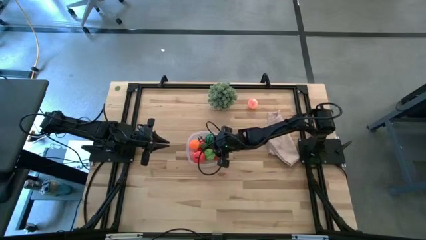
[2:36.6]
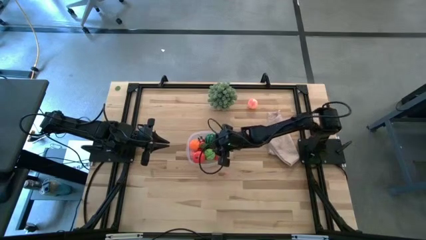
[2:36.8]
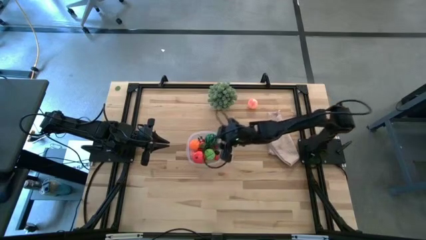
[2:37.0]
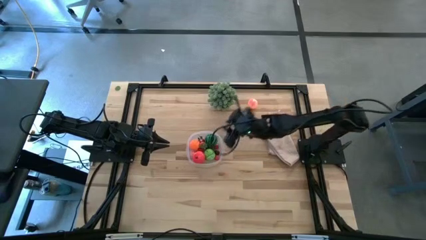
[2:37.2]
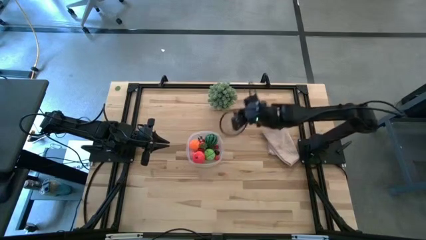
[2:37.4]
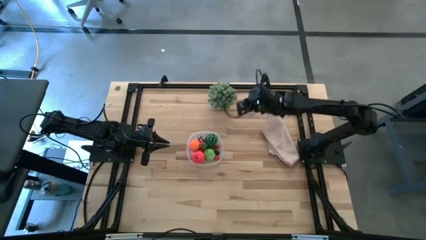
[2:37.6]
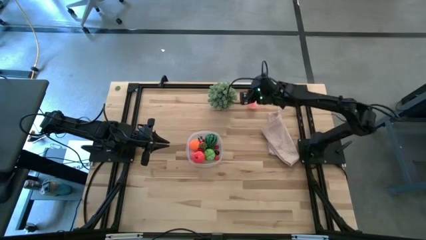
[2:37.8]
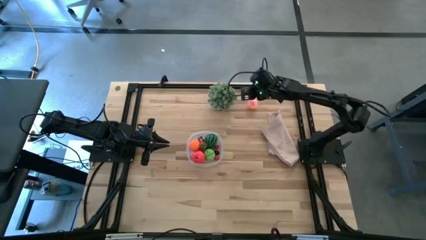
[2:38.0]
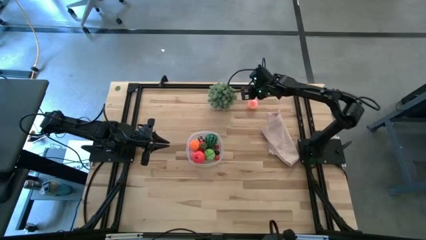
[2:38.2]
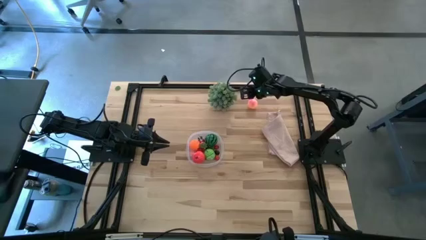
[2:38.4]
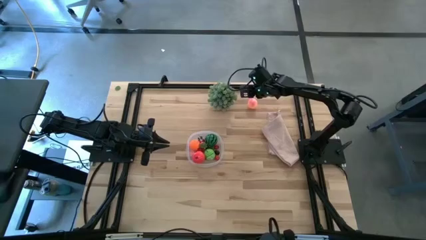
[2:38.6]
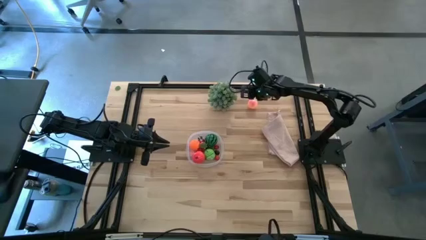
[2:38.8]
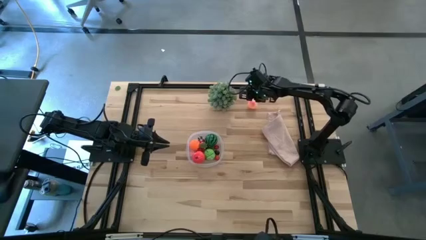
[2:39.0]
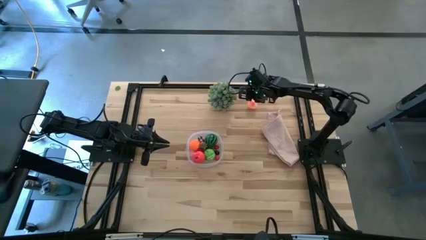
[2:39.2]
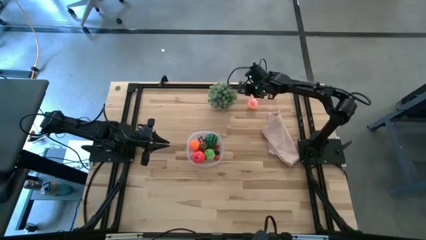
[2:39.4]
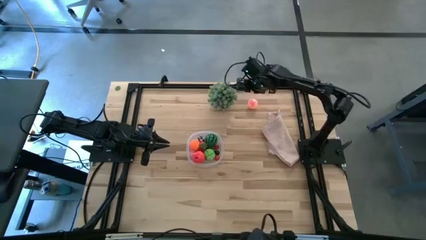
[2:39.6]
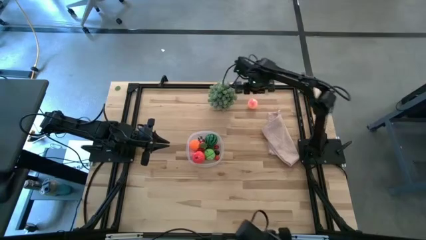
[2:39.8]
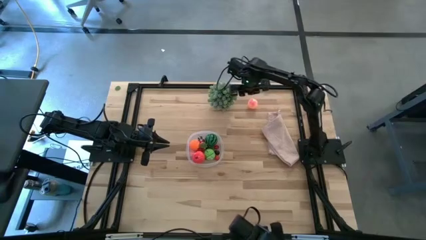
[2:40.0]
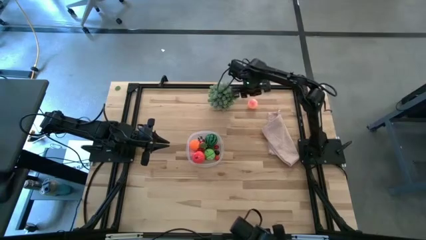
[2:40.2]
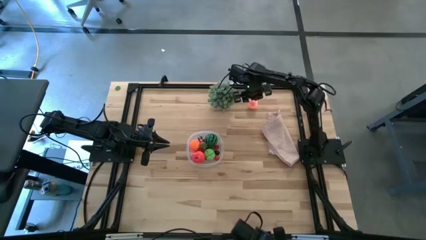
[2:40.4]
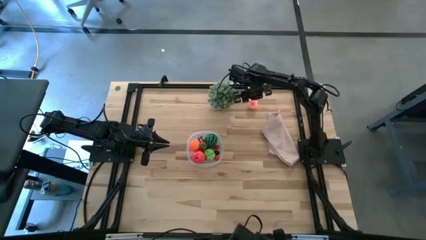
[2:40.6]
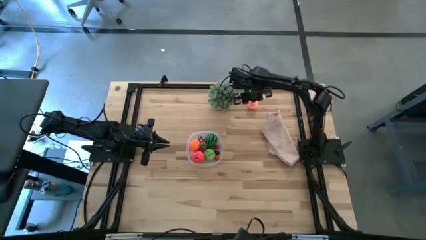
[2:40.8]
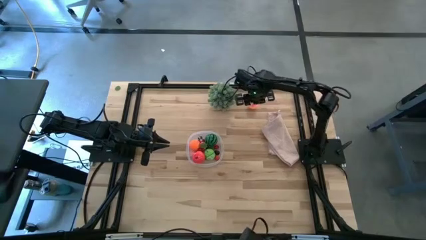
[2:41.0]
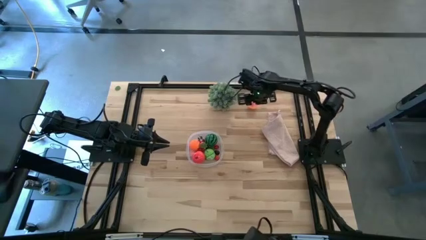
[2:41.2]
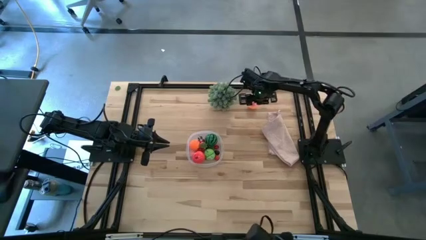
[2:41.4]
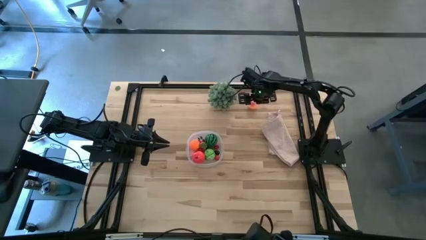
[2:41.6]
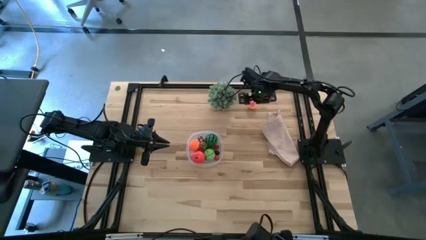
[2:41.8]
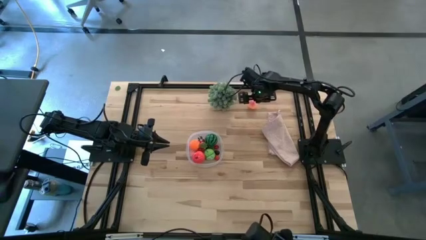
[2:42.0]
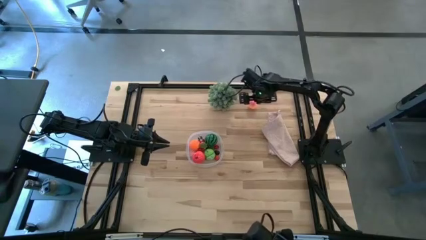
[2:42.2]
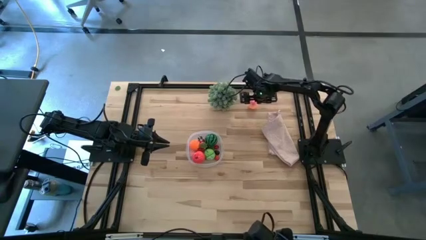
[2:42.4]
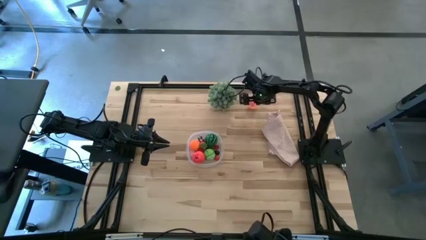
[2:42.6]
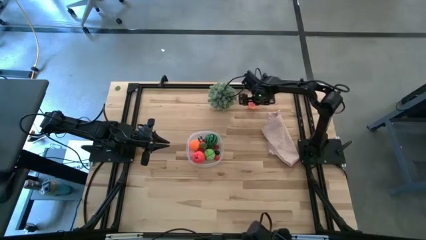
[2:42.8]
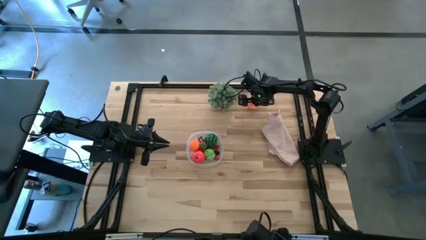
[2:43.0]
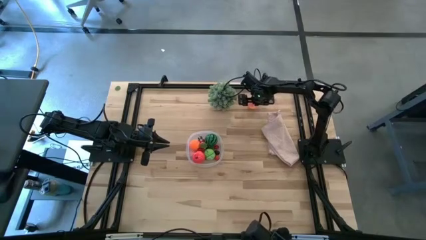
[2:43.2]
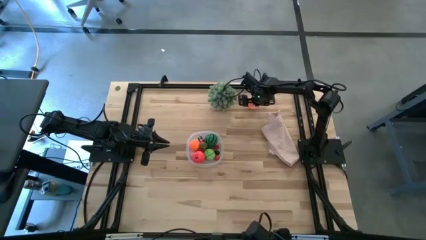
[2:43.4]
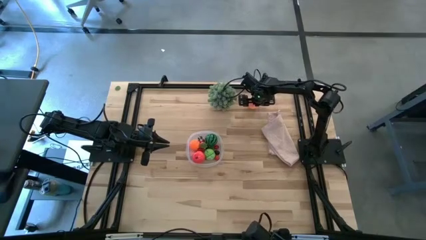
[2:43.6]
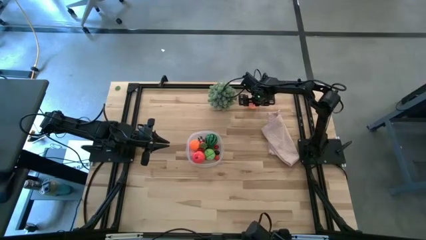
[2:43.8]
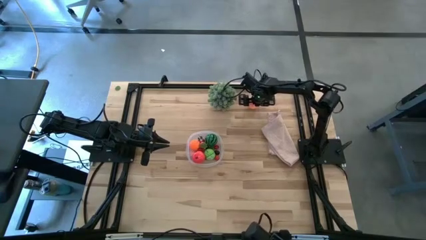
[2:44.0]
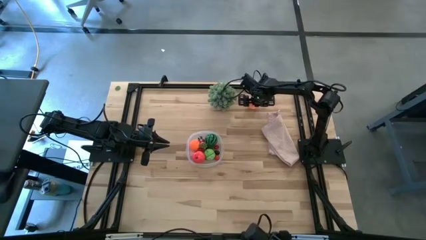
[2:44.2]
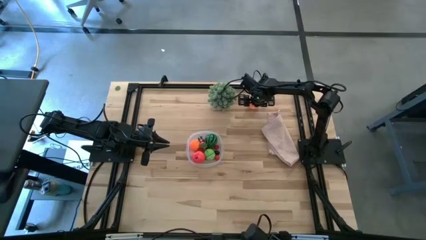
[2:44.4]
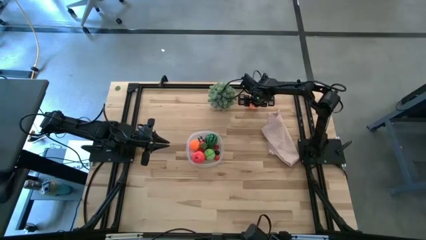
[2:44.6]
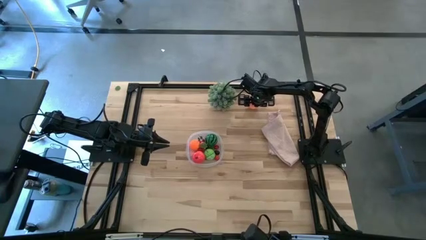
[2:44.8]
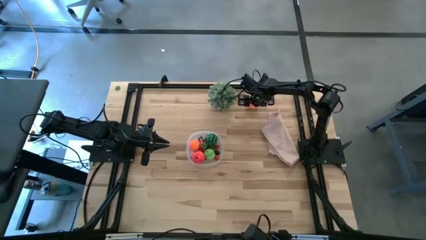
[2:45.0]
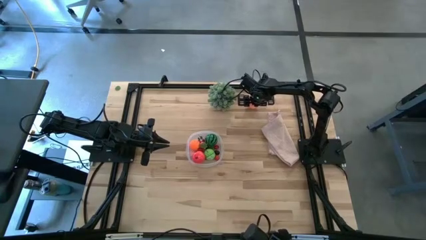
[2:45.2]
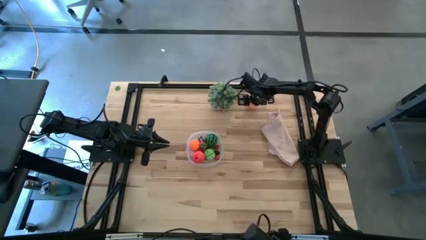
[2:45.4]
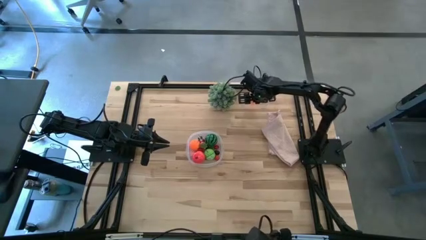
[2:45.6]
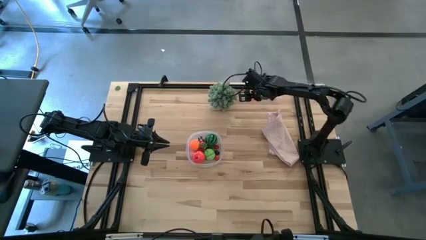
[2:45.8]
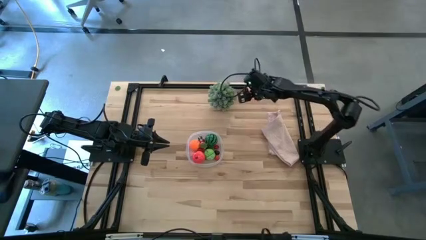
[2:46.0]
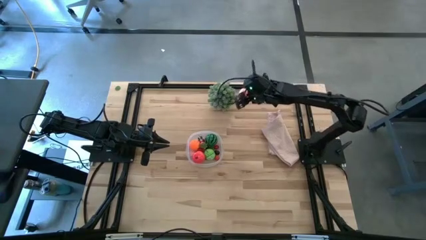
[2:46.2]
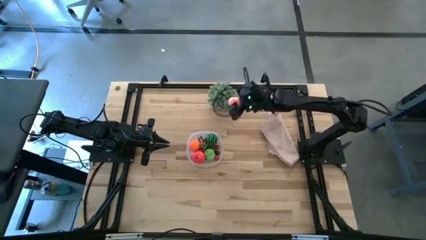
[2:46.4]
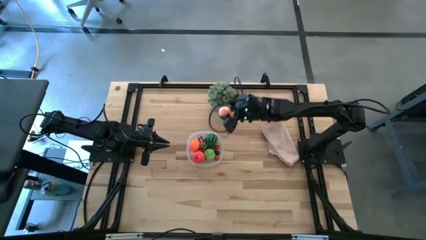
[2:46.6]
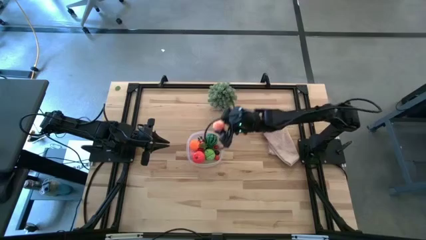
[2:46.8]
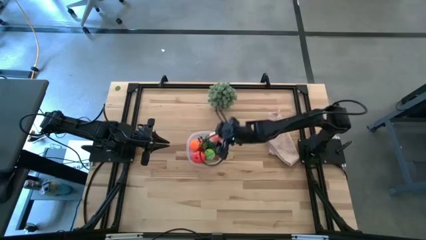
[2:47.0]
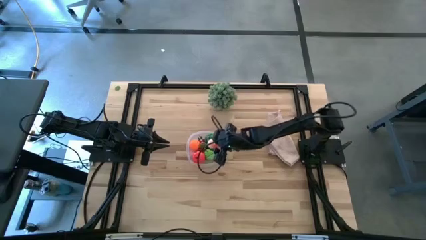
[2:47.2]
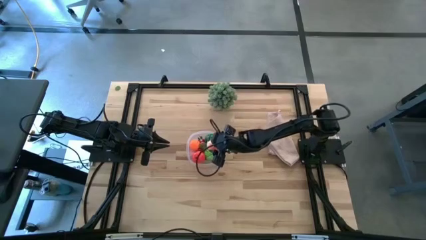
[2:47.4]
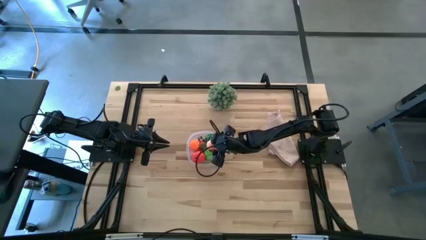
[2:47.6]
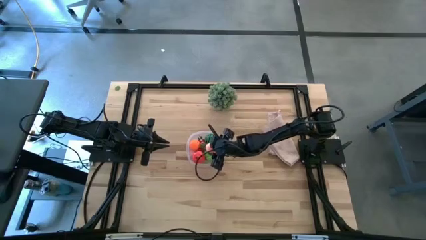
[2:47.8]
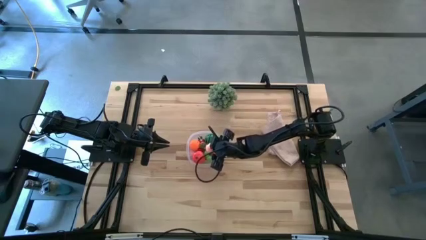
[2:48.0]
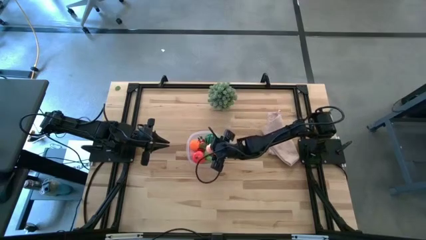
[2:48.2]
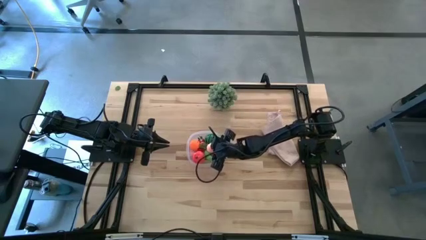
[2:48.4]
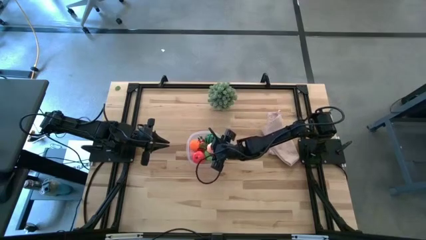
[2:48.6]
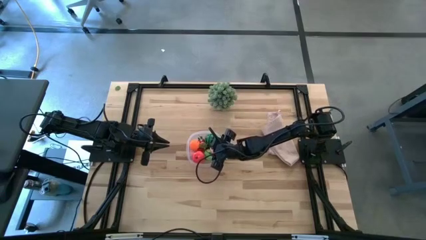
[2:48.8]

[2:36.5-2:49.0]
Task: Pick and placing Produce into tupperware
Put the pink peach into the transparent bin

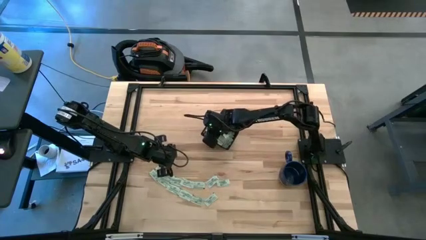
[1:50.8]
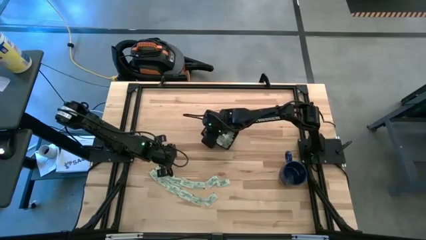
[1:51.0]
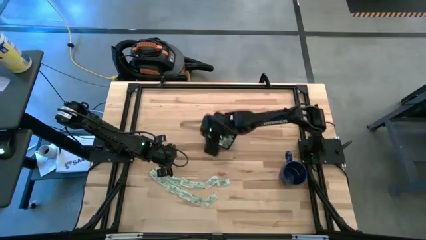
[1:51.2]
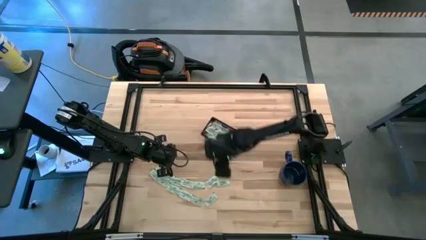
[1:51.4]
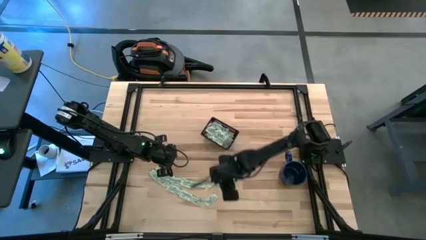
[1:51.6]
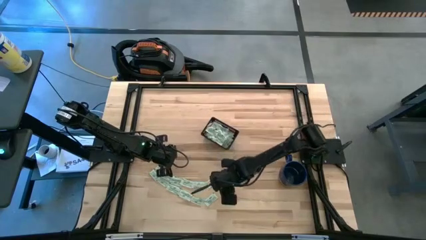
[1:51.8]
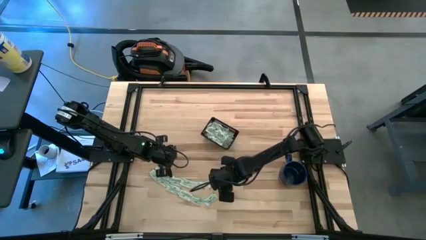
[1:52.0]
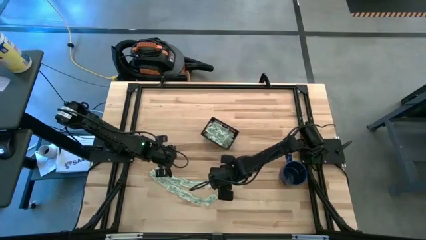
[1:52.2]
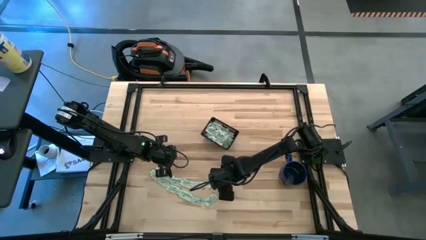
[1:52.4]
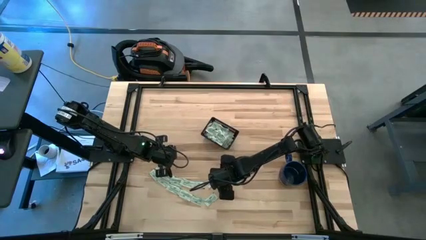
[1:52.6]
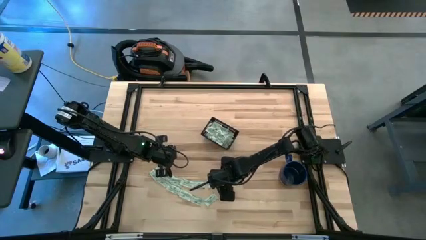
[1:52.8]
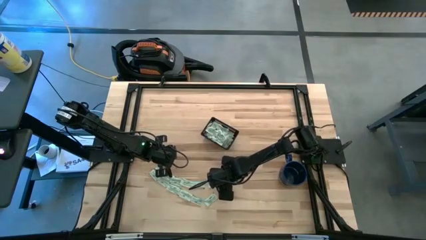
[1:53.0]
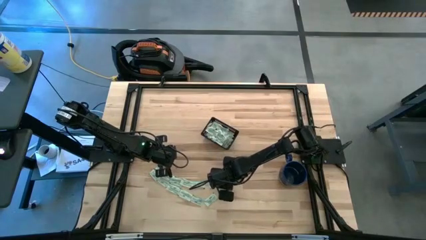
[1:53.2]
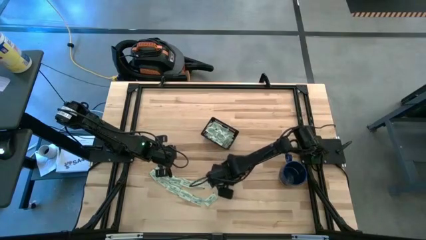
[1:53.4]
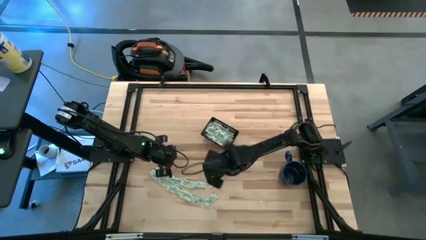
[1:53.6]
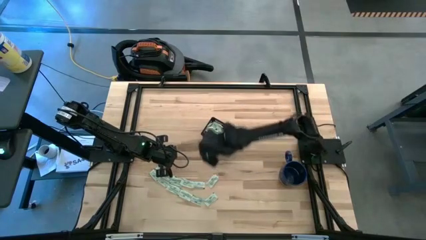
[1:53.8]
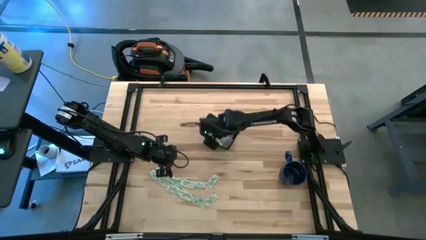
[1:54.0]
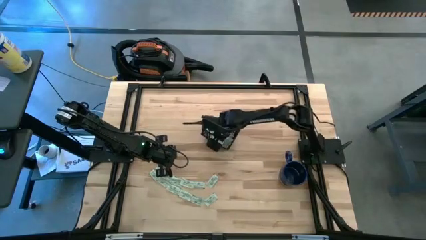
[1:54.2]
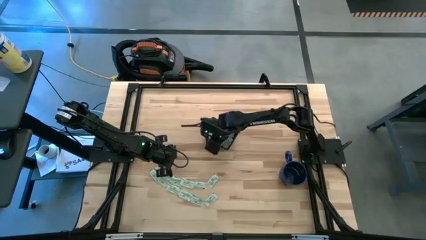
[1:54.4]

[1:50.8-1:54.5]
Task: Pick and place Stevia / Truvia into bins
Put the stevia packet into the black bin
